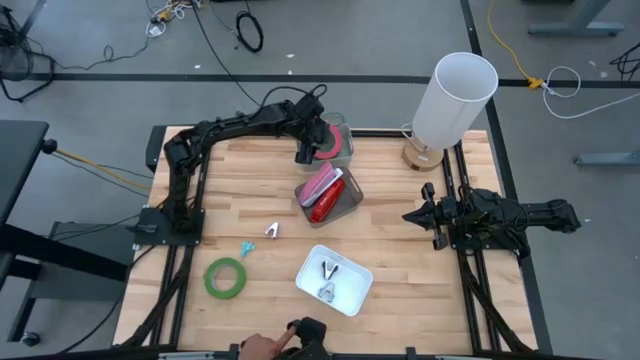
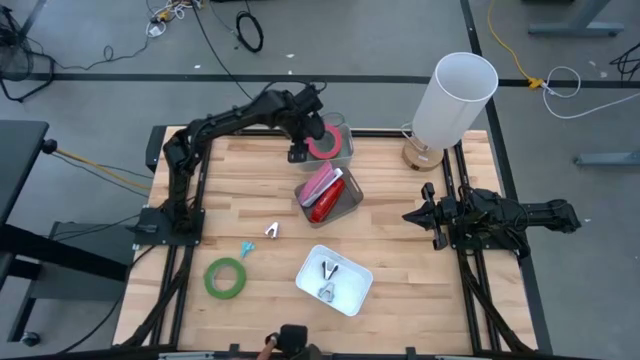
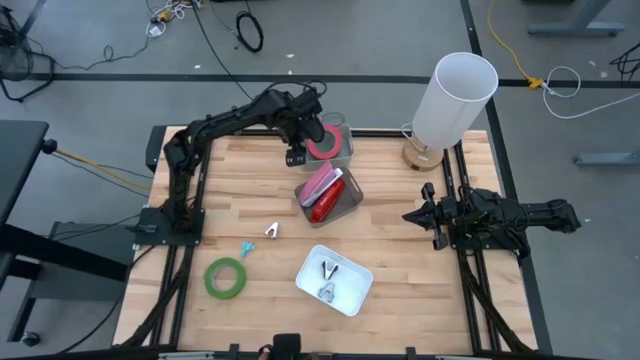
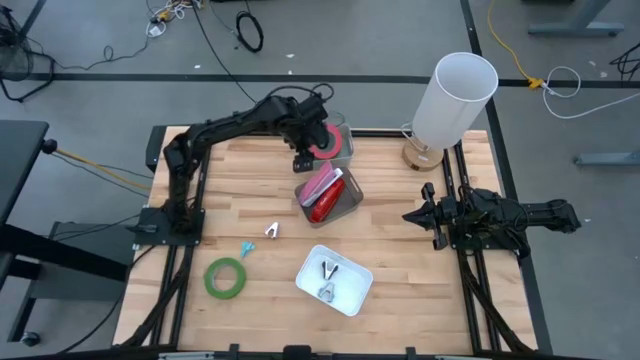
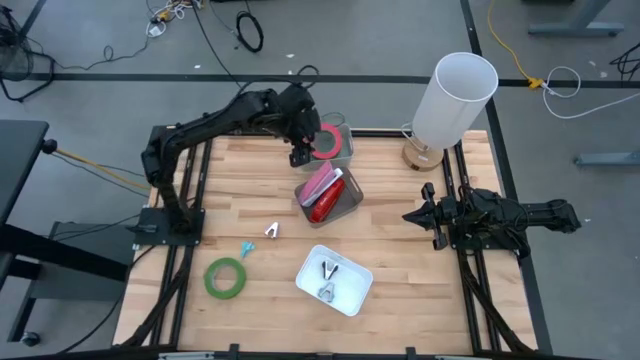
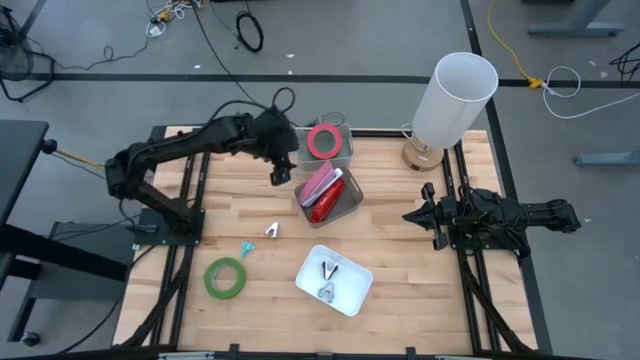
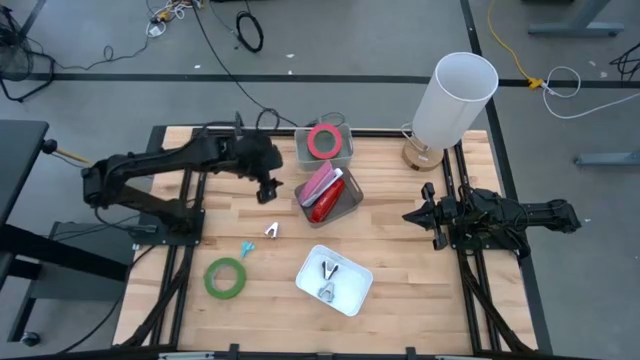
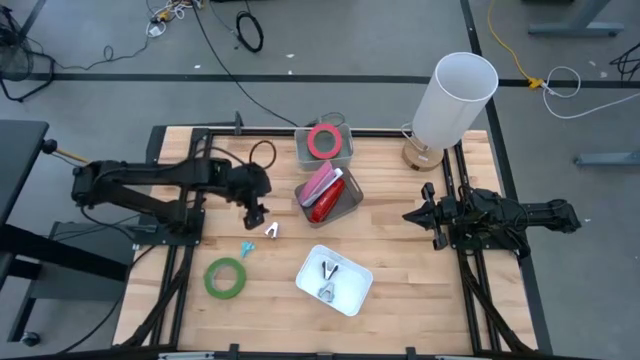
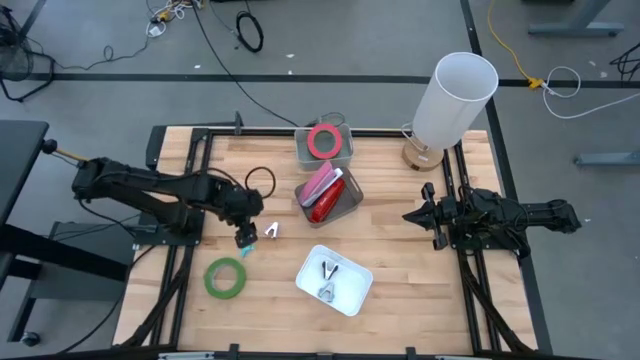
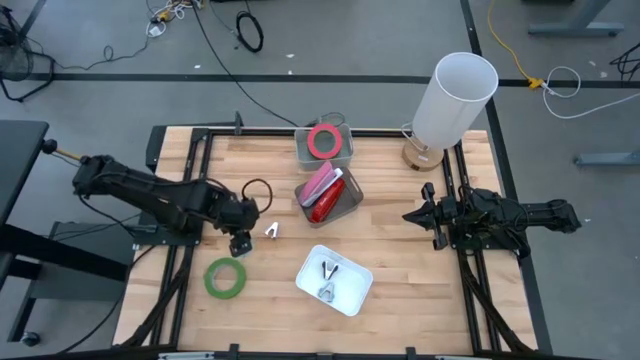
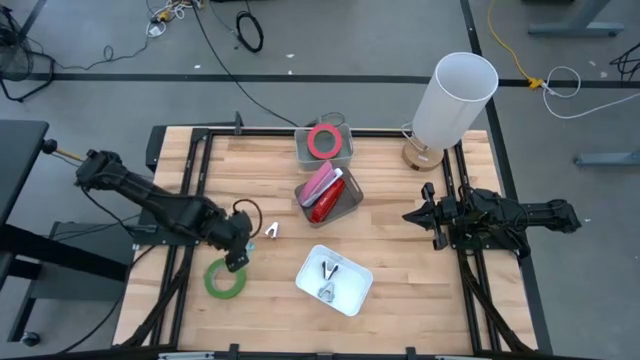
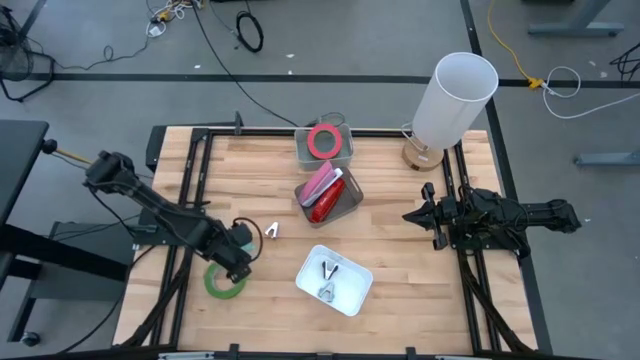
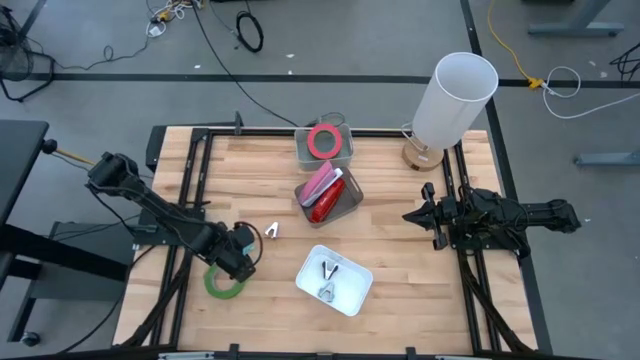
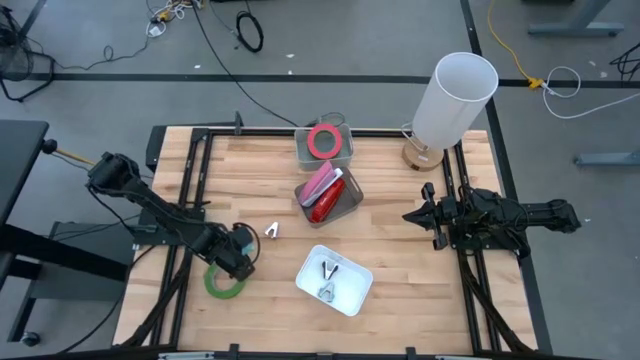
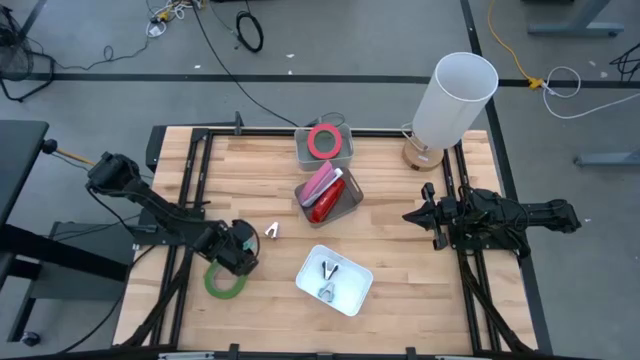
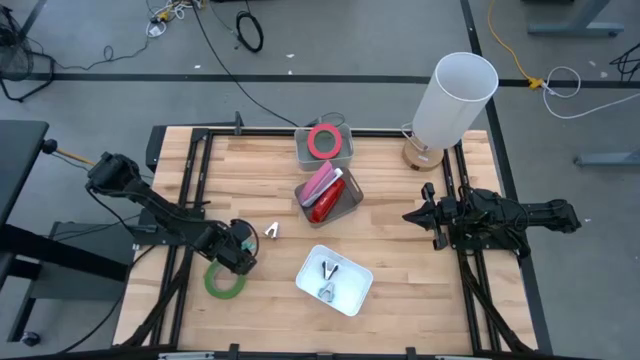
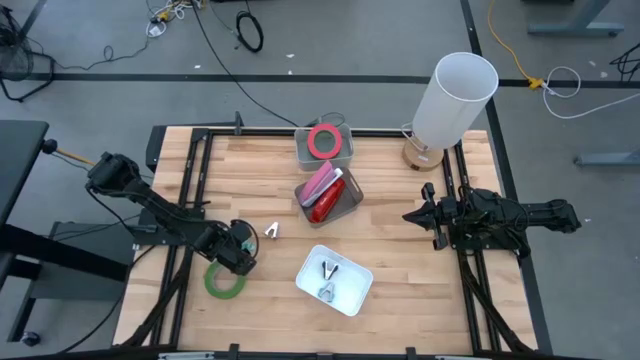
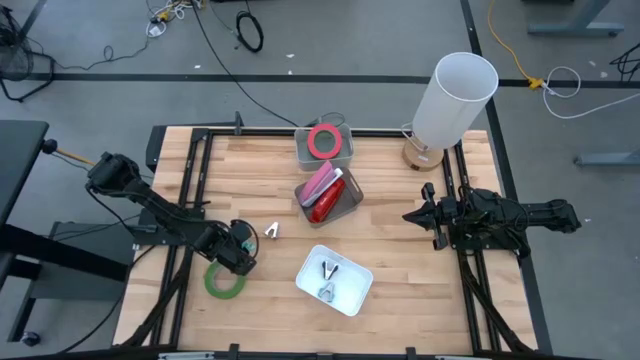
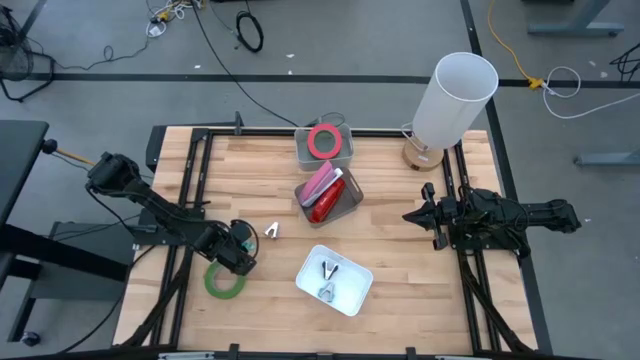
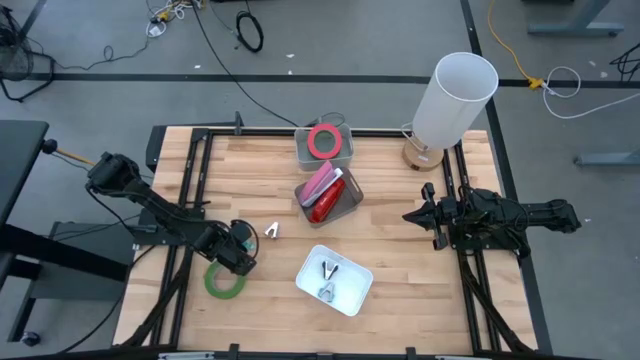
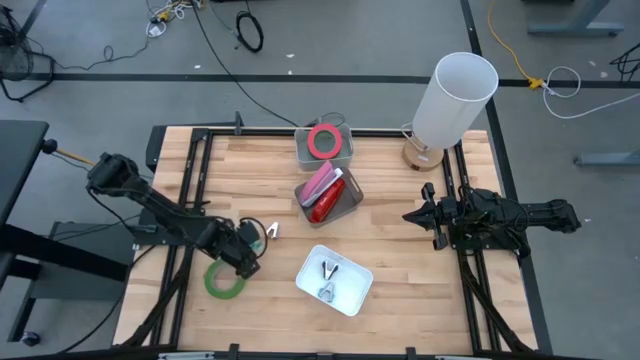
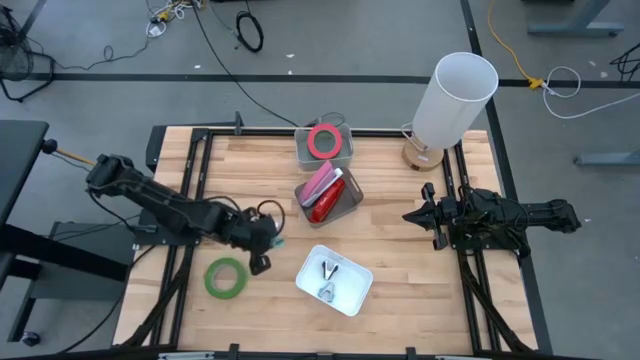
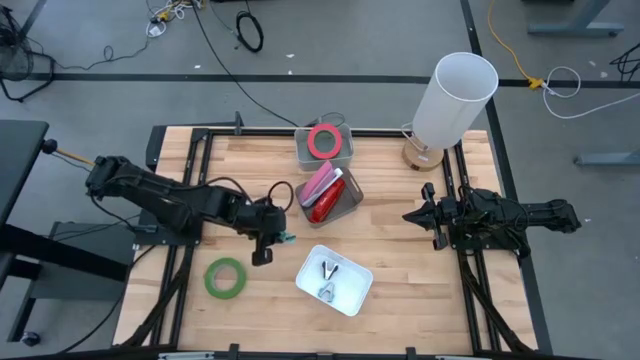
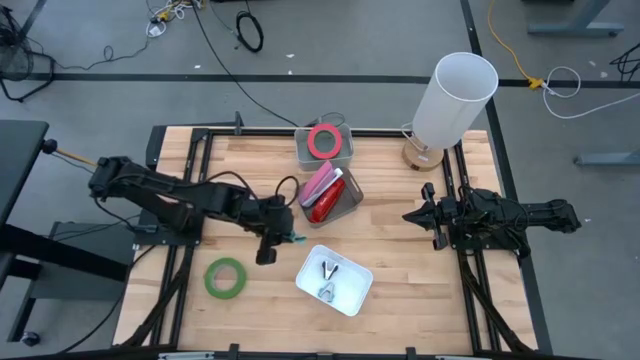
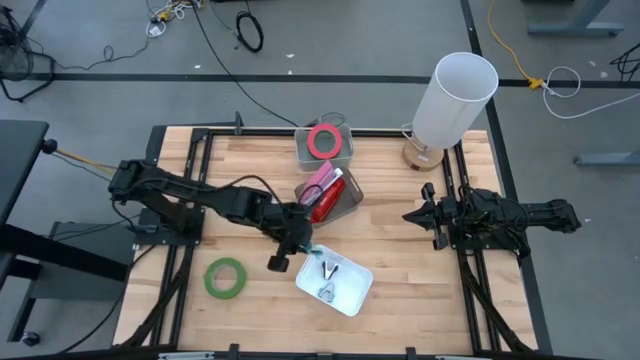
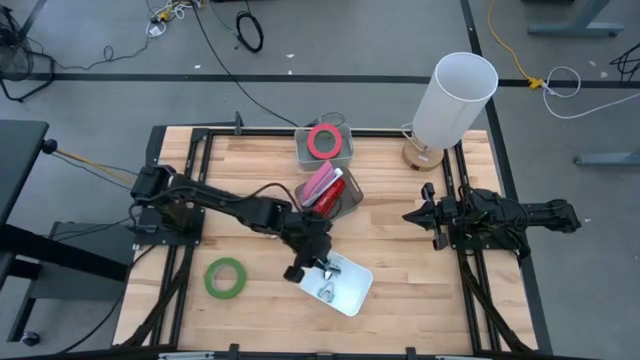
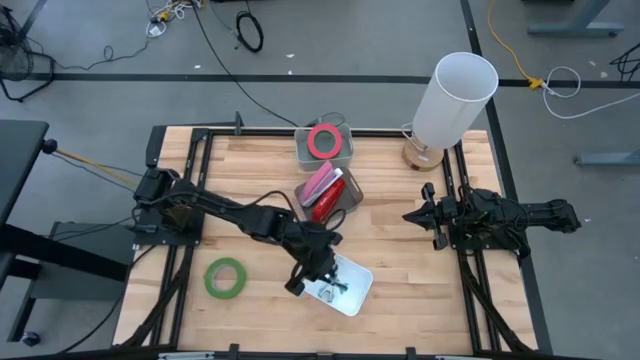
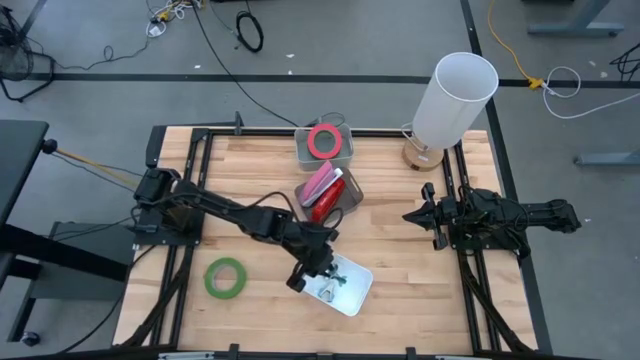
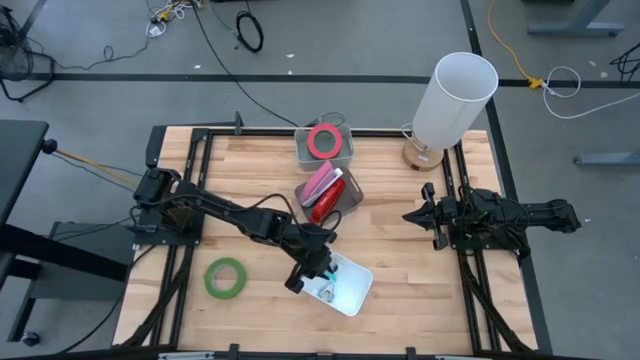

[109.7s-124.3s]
Task: Pick and place Stapler, Stapler remover, tape
Put the light blue staple remover into the white bin

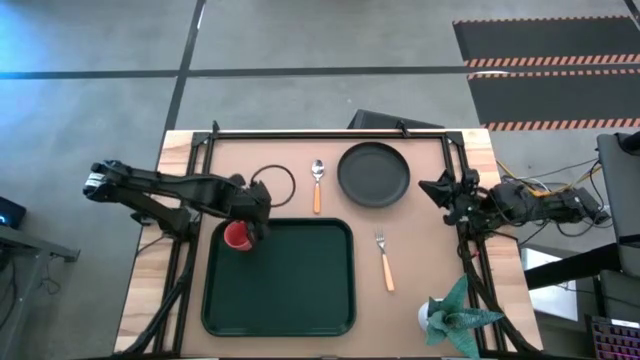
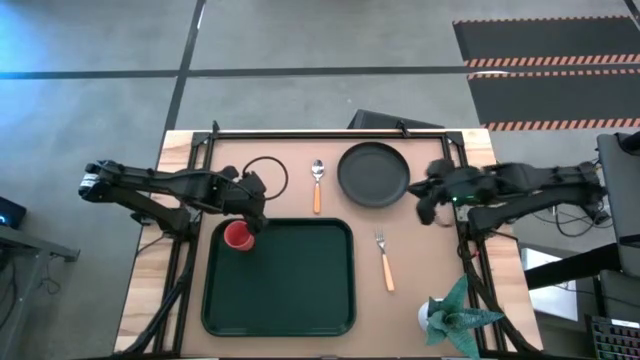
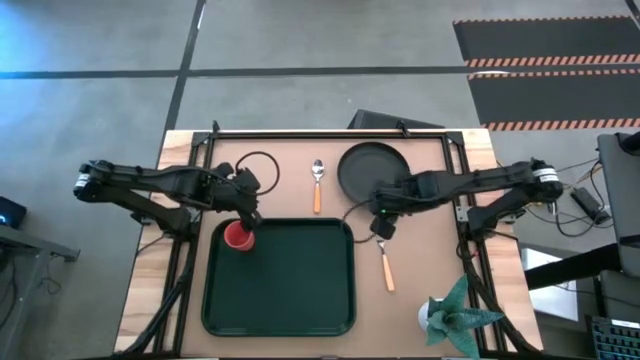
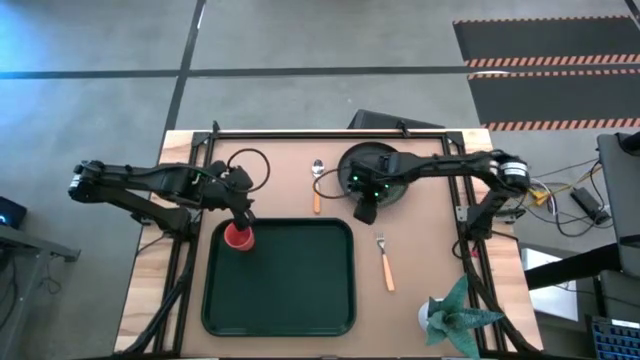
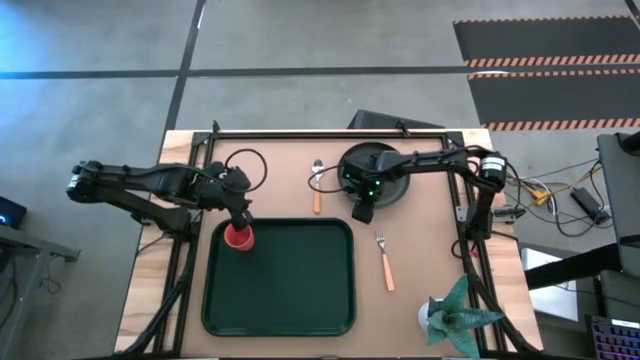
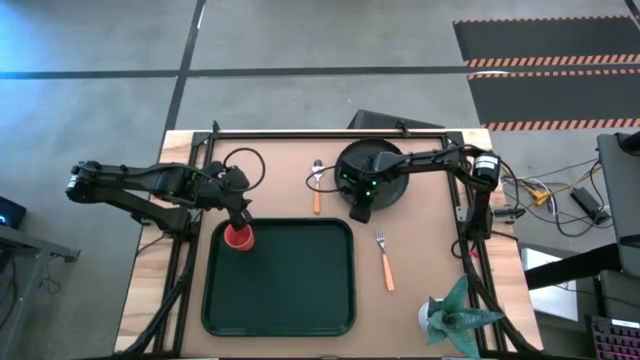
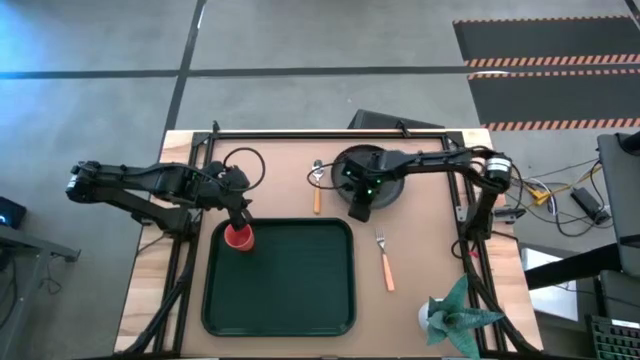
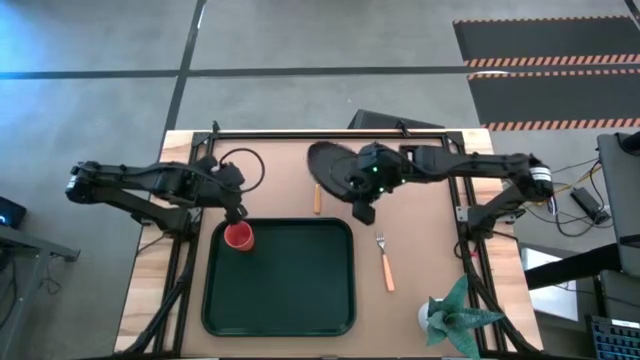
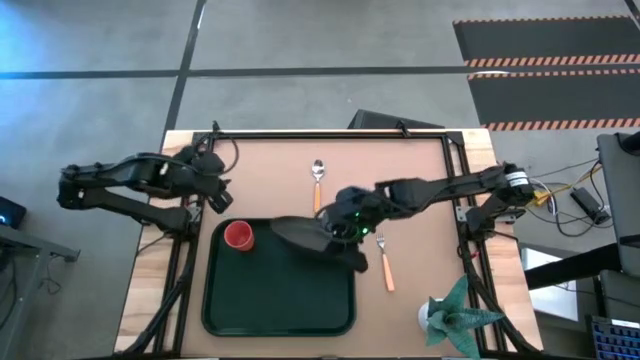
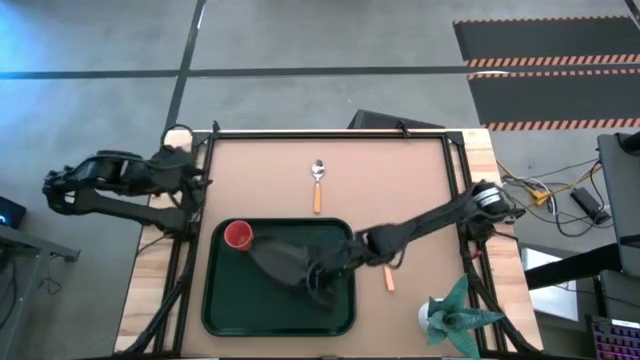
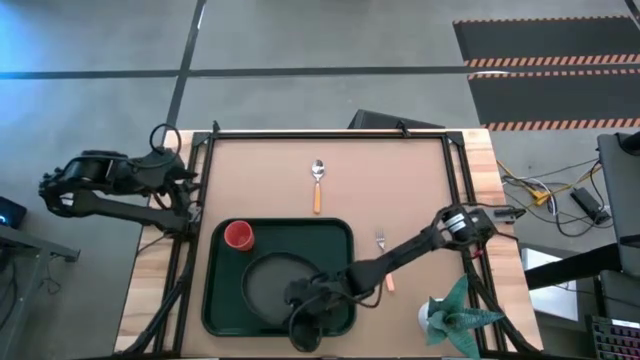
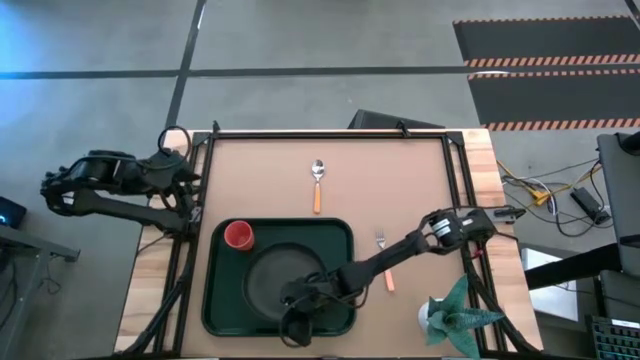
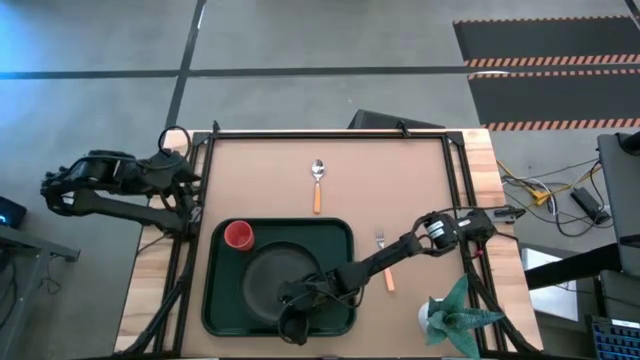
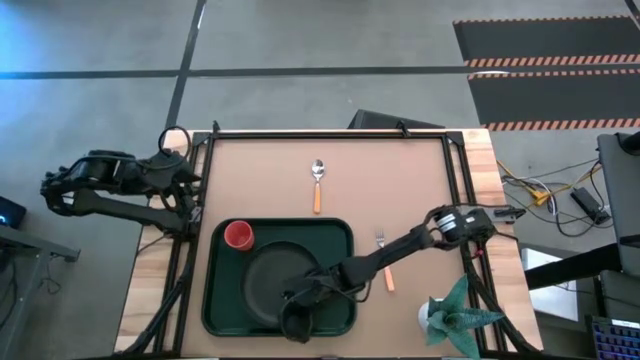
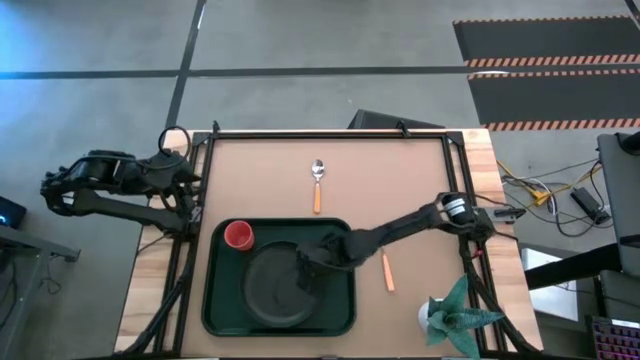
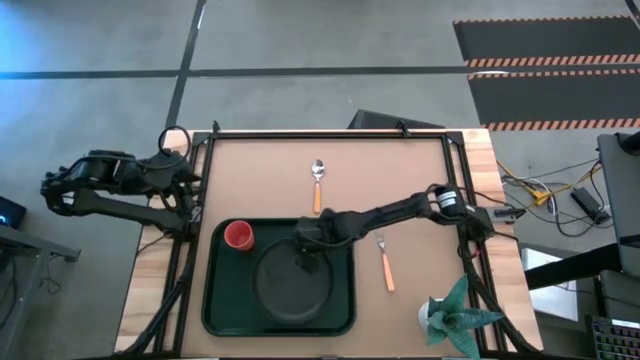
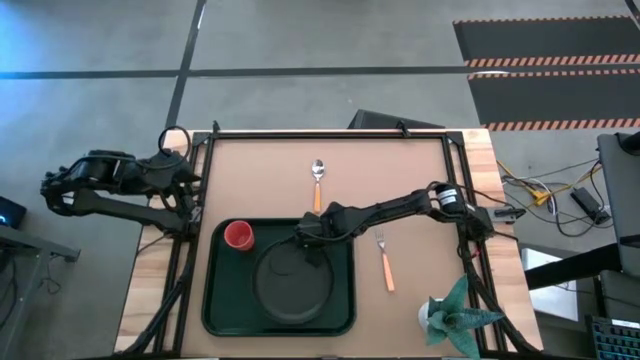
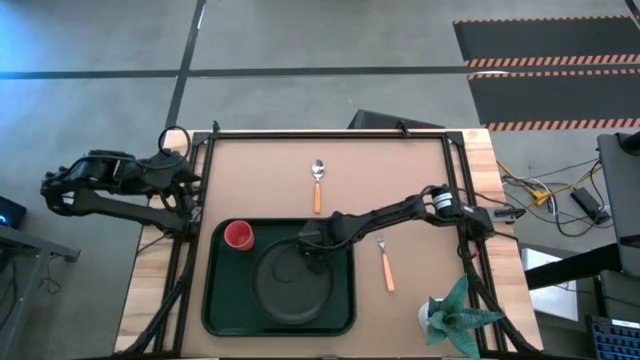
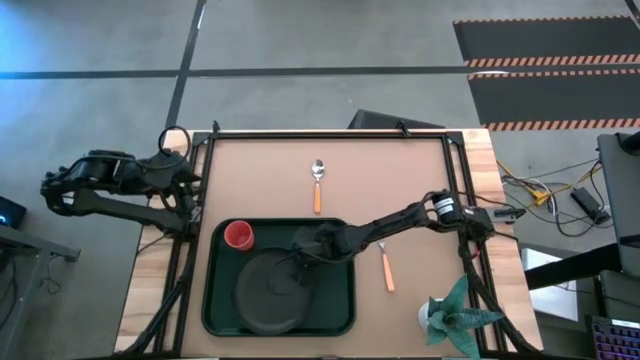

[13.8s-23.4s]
Task: Pick and place plate/cup/fork/spoon on tray
Put the black plate on the green table tray
